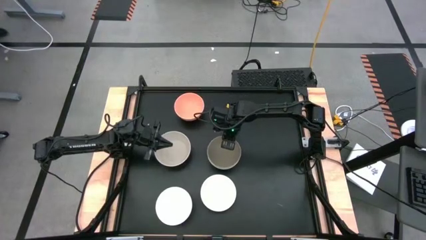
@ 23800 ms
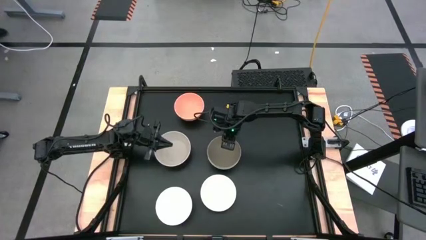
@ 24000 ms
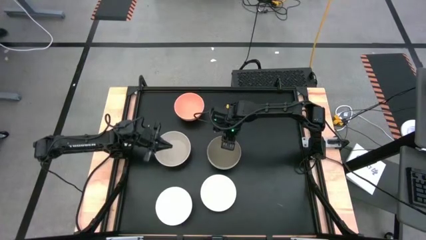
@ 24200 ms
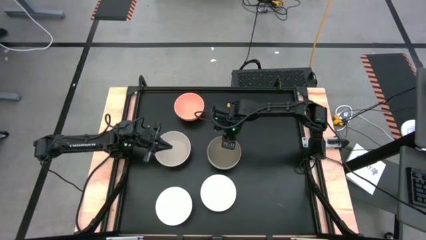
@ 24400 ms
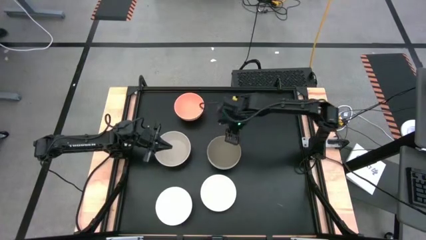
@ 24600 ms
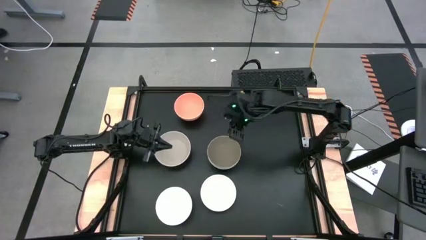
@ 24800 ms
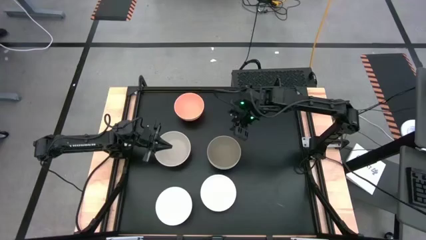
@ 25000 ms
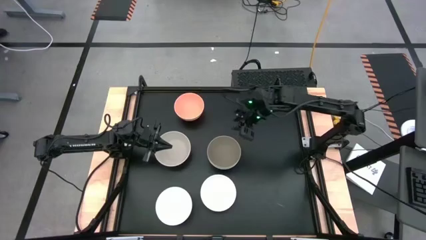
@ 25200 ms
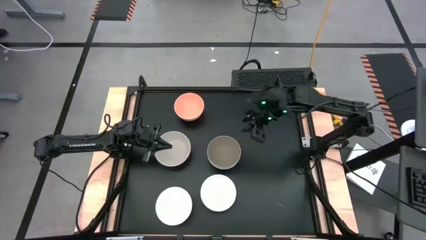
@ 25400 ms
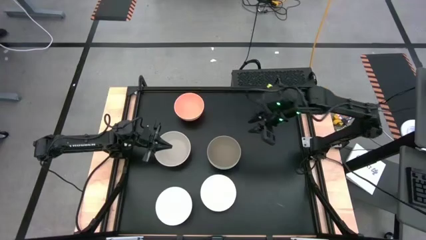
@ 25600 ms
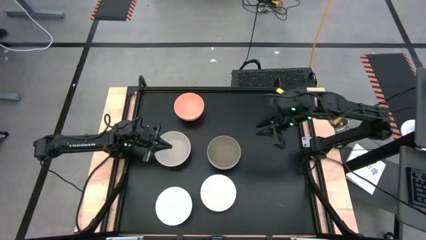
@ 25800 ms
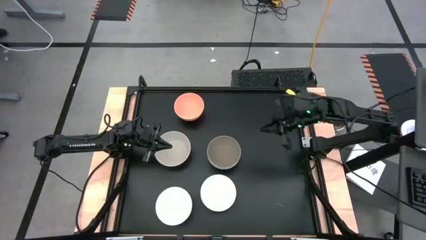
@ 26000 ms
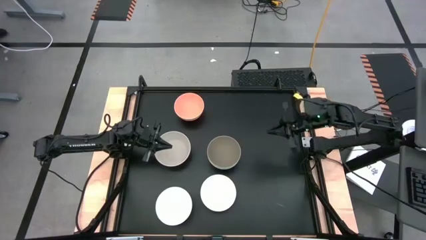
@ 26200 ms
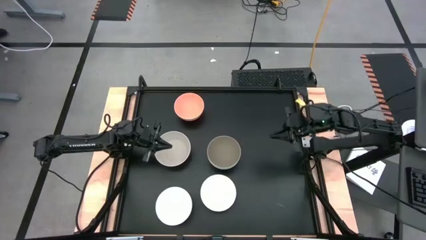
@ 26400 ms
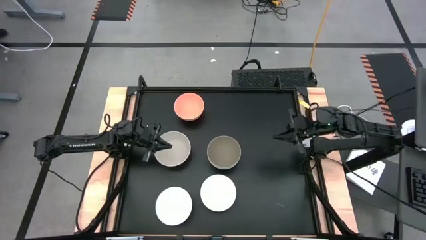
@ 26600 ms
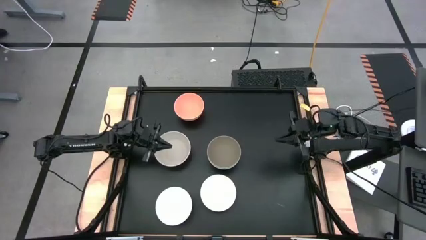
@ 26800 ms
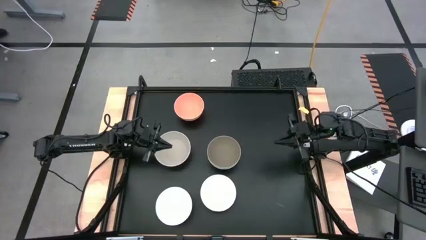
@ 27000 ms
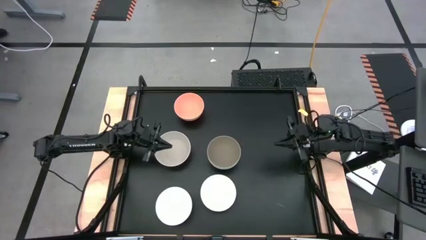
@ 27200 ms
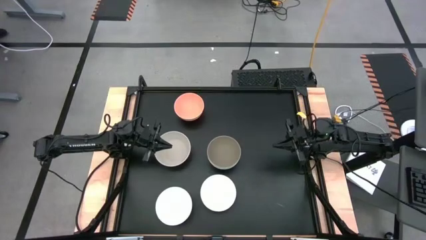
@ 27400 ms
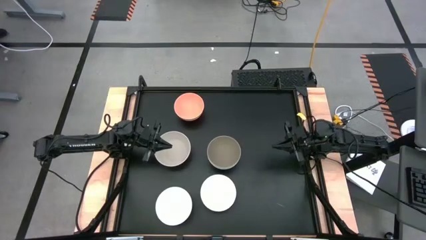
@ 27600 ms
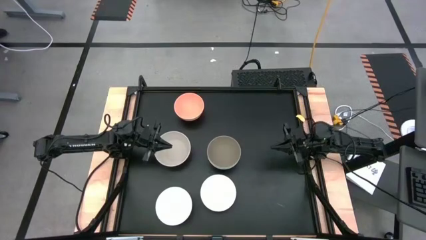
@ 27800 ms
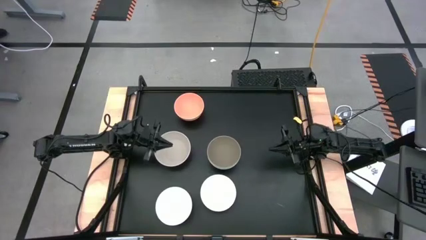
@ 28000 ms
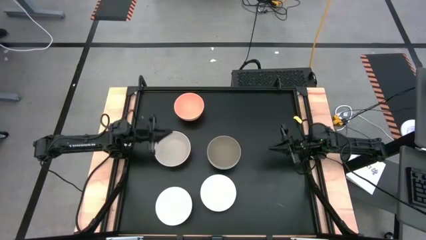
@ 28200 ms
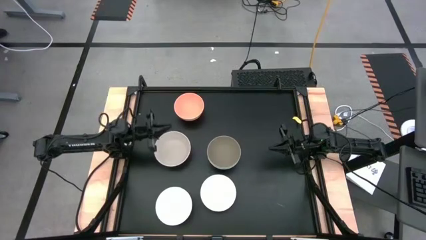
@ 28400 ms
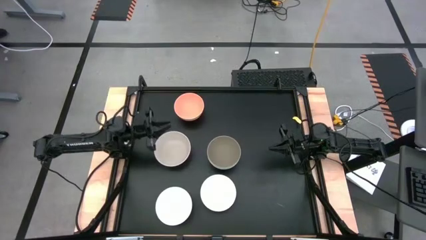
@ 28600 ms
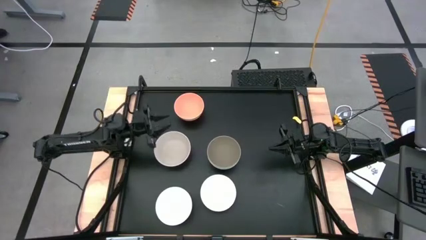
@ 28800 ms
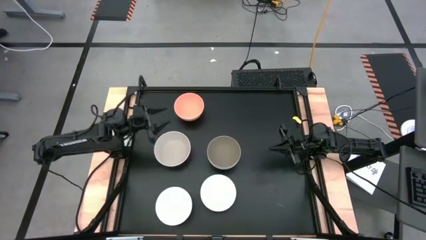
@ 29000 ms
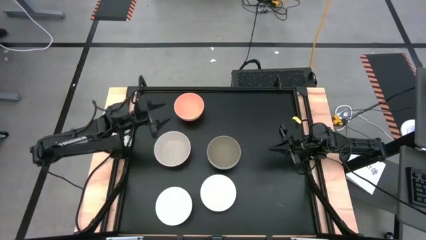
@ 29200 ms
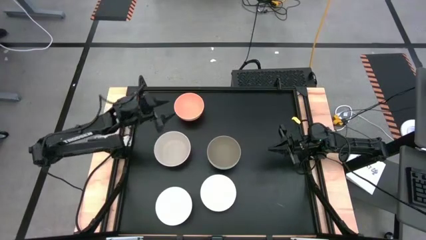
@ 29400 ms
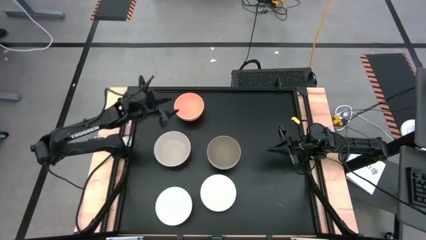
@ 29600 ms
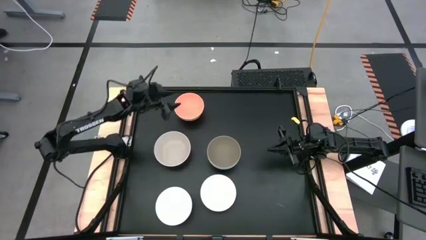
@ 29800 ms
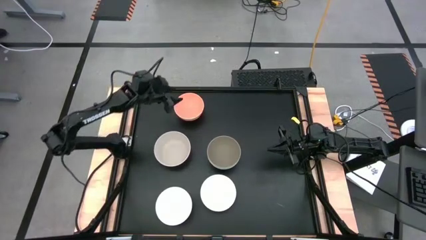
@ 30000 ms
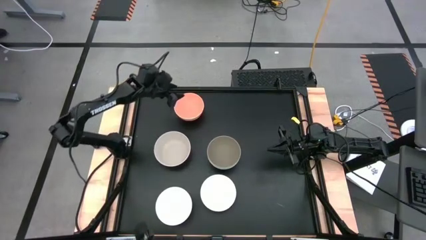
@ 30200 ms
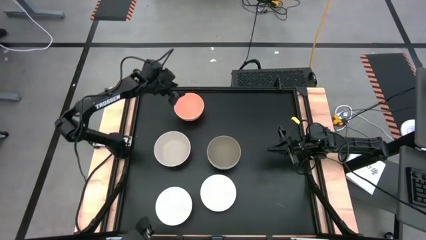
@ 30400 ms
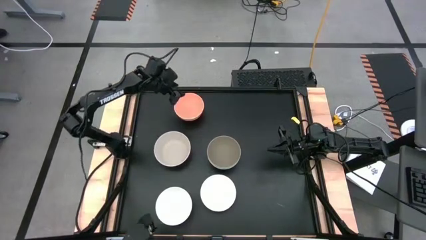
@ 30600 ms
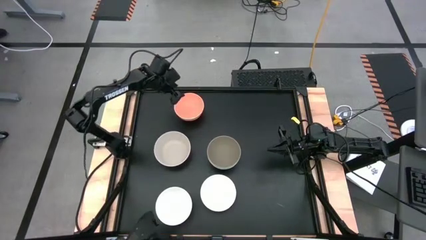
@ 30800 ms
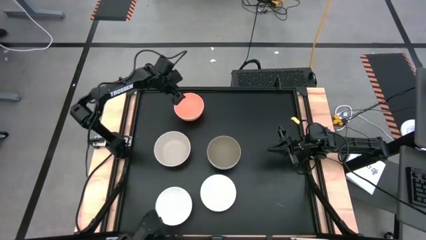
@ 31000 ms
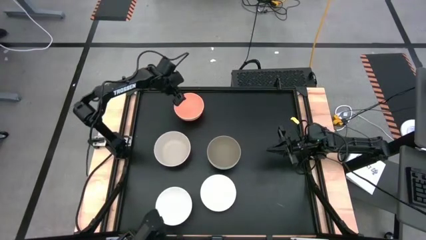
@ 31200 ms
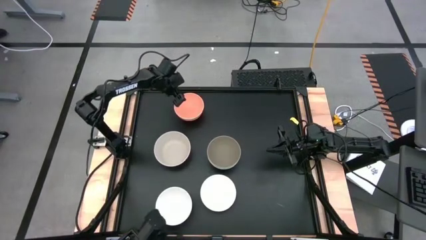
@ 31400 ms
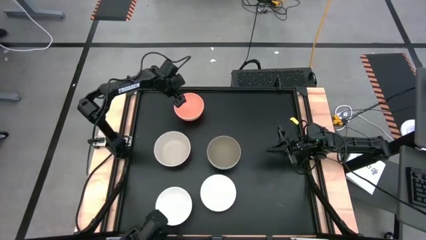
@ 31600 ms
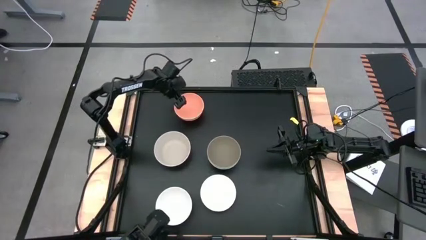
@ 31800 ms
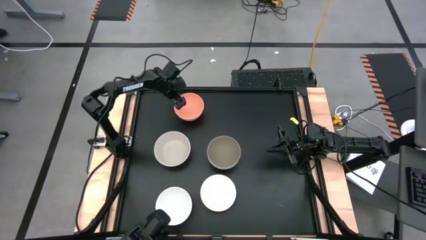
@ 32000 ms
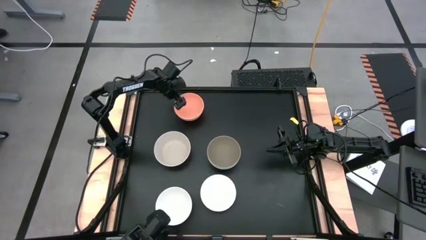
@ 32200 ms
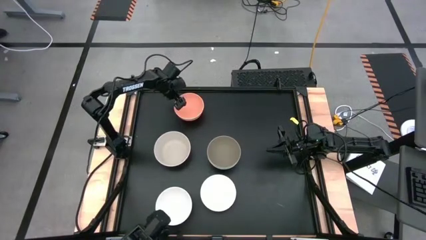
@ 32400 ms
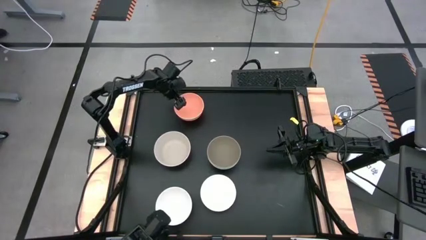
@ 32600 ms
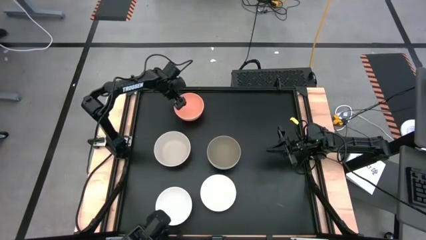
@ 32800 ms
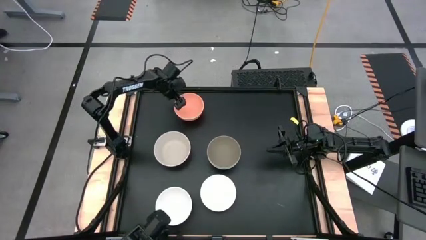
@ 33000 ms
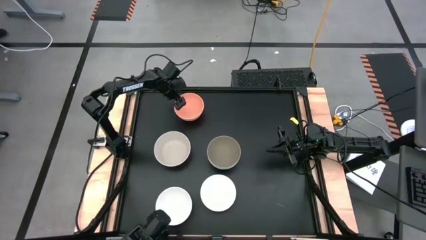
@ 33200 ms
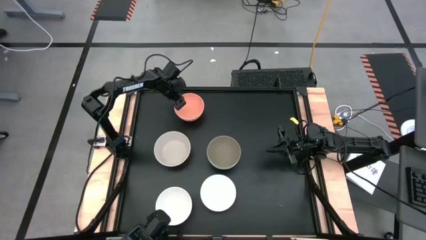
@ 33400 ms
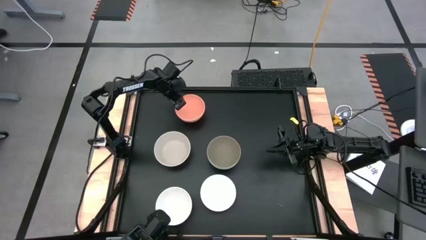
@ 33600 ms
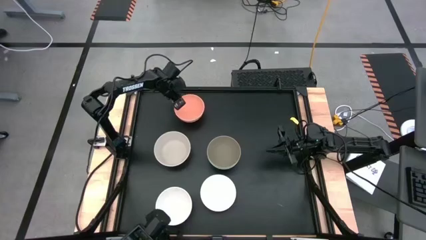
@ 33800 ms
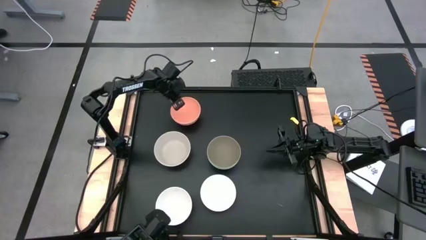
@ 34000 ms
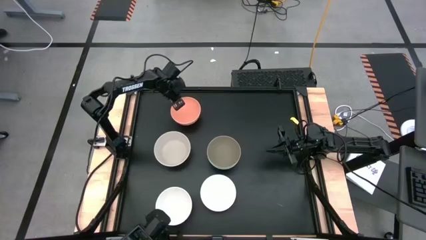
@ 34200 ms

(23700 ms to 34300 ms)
Task: Nest bowls inside each other
Stack the orange bowl on top of the brown bowl

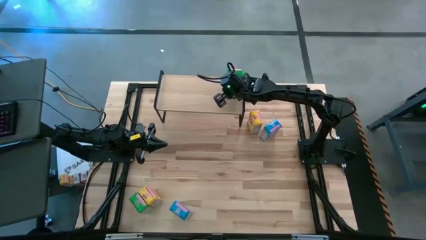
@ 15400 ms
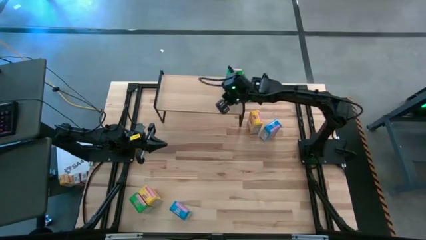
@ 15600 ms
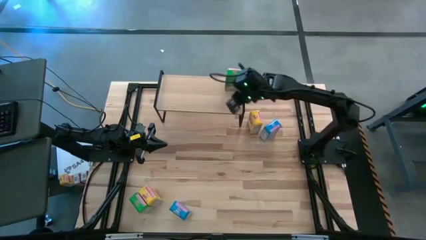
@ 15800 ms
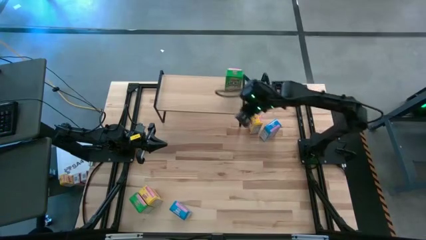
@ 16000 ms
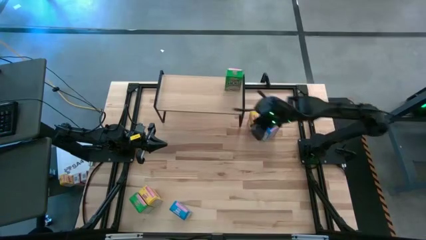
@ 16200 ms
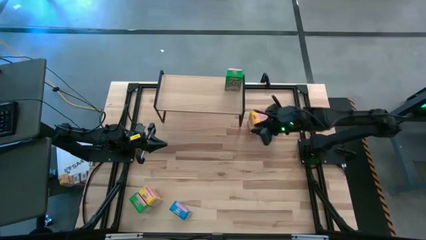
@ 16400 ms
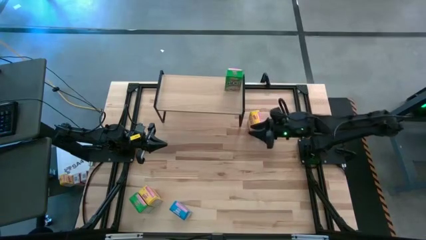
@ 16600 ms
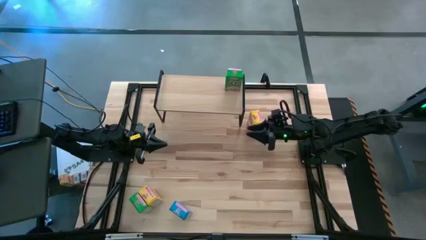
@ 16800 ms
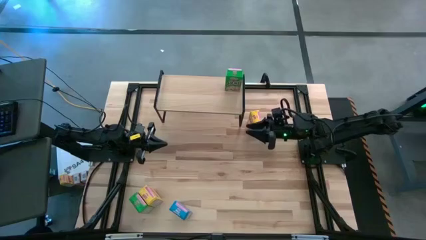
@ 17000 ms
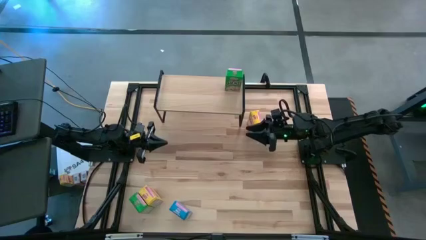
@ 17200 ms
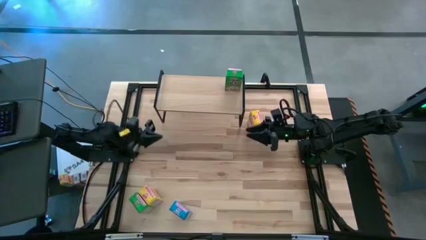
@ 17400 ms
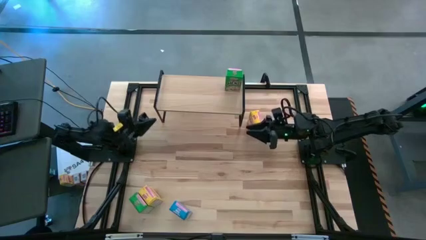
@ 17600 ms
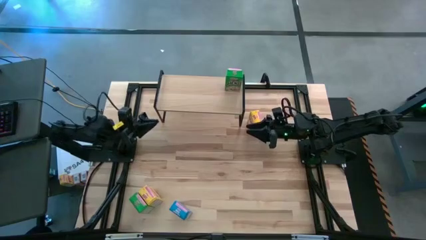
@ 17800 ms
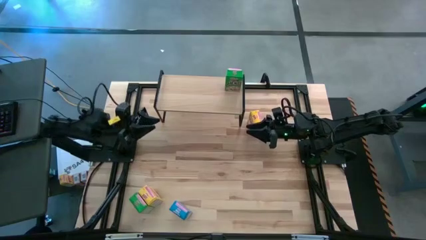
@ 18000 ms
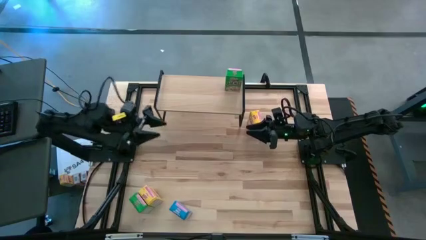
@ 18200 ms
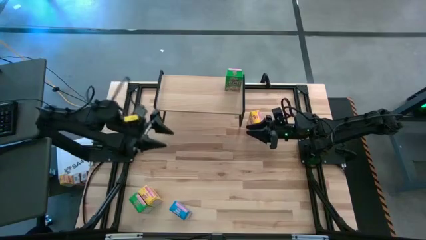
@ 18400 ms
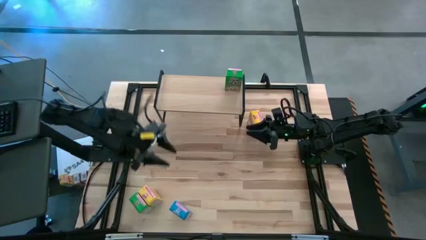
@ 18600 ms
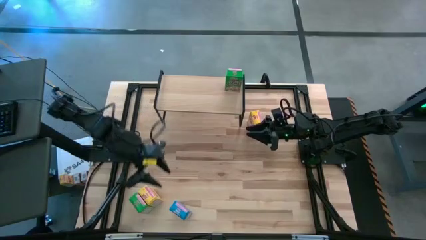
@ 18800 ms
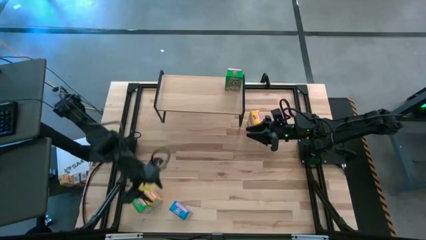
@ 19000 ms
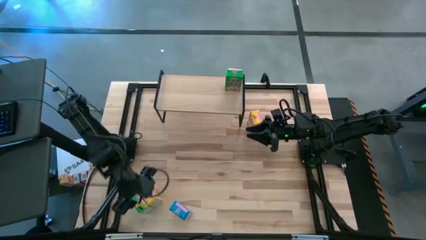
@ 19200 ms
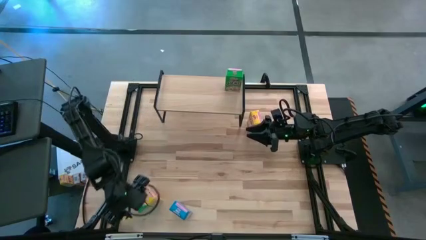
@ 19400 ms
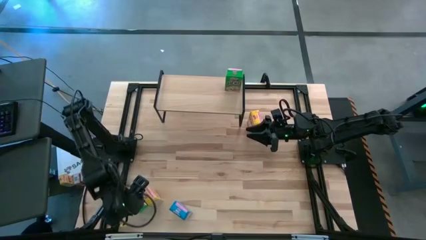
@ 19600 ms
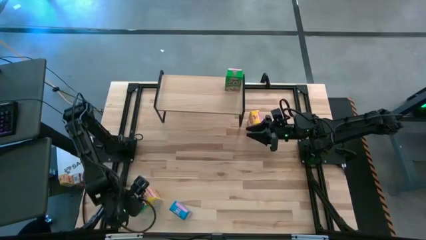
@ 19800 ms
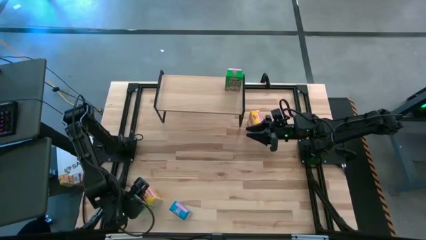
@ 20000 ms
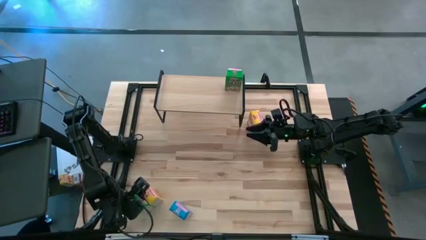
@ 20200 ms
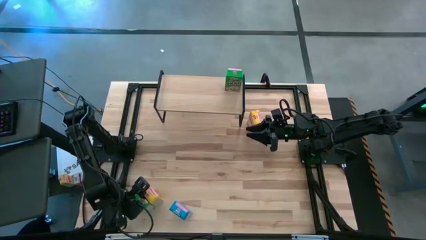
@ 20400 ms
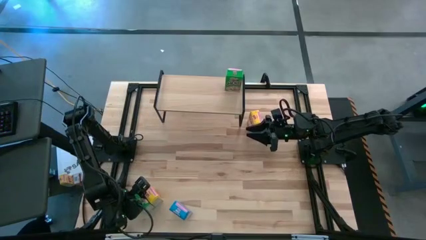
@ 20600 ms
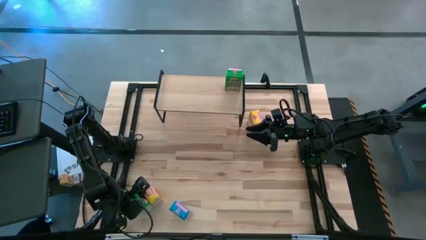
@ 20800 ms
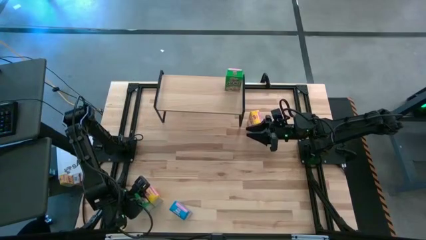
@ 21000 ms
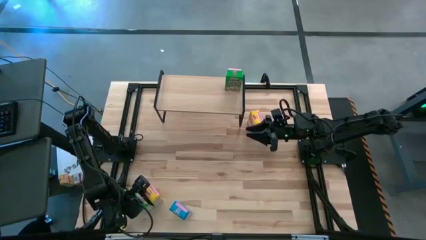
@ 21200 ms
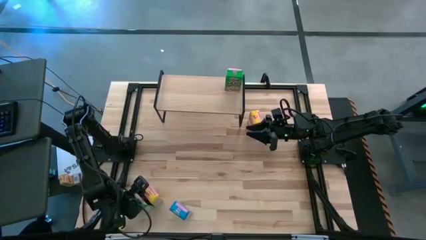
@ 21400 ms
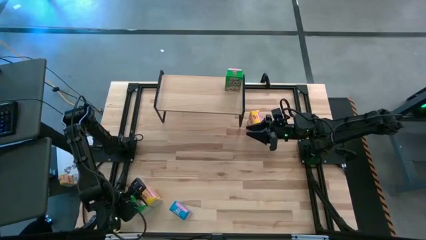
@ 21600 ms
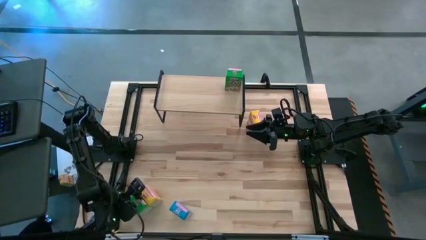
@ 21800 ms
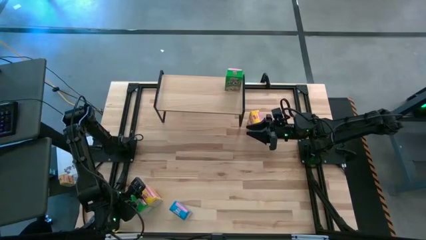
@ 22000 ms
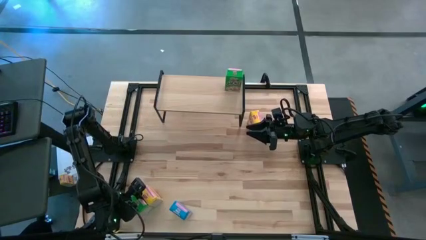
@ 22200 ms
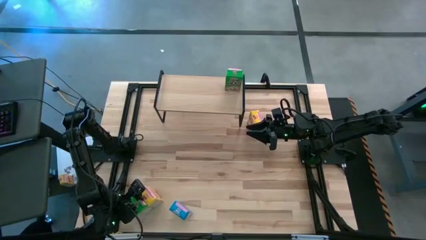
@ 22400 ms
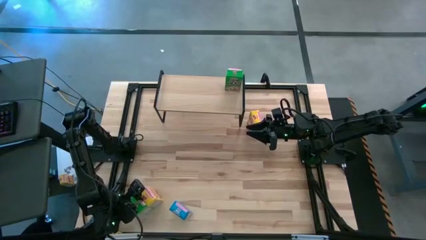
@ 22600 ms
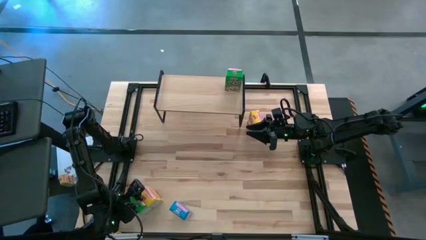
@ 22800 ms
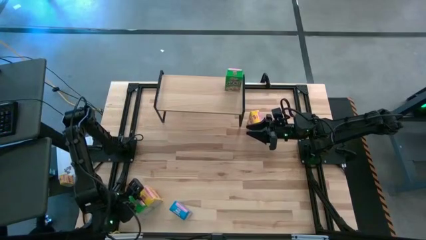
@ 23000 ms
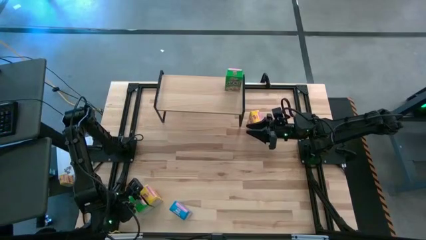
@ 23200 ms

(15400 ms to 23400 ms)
Task: Stack cereal on shelf
Put the green cereal box on the shelf aligned with the other green cereal box
